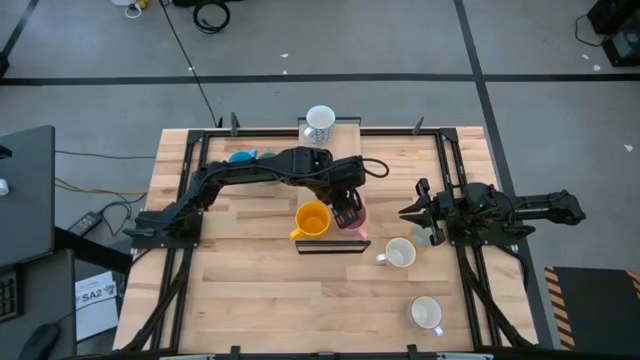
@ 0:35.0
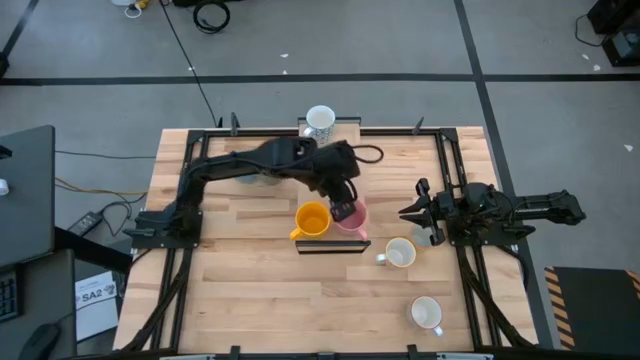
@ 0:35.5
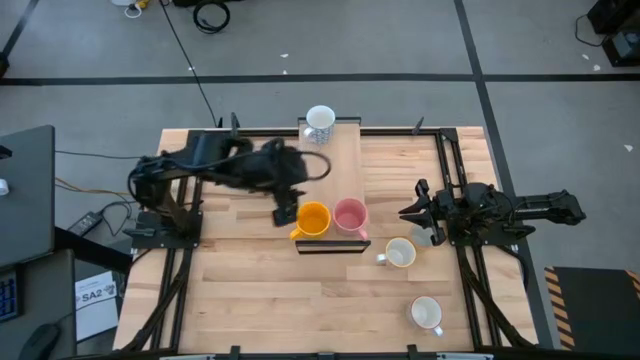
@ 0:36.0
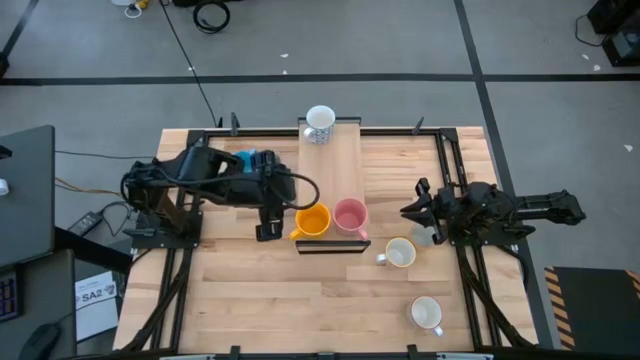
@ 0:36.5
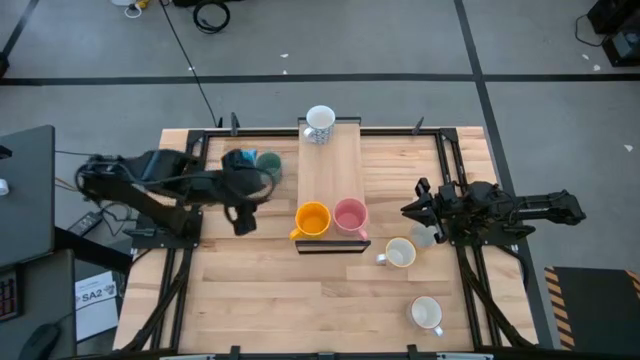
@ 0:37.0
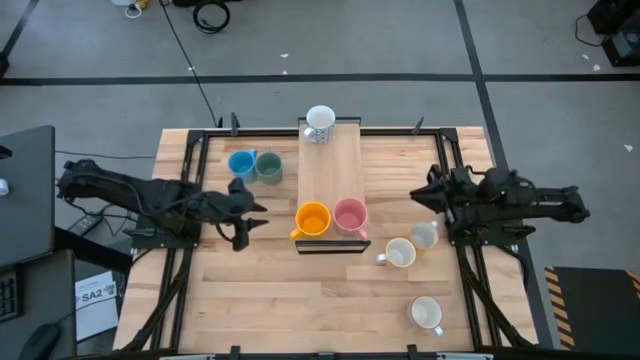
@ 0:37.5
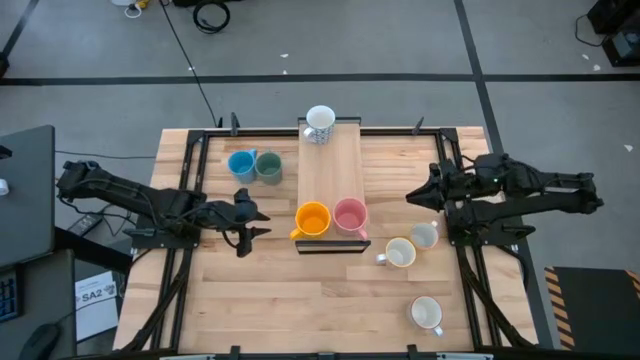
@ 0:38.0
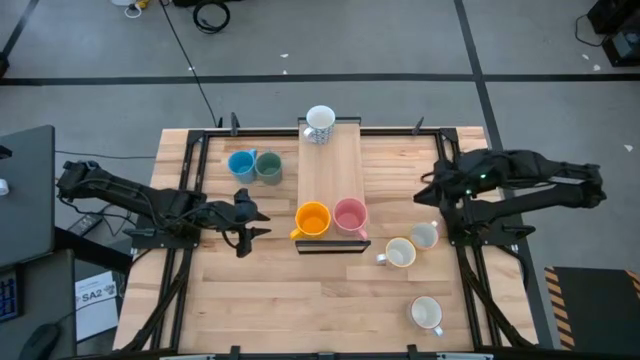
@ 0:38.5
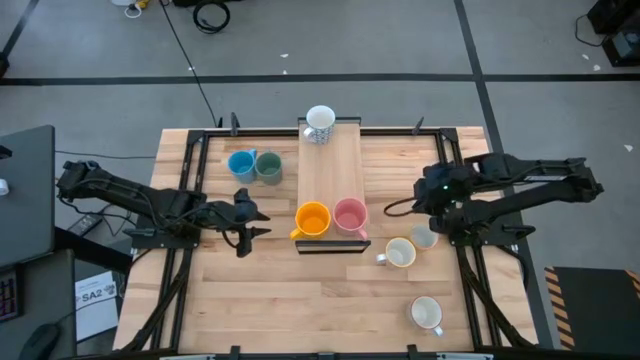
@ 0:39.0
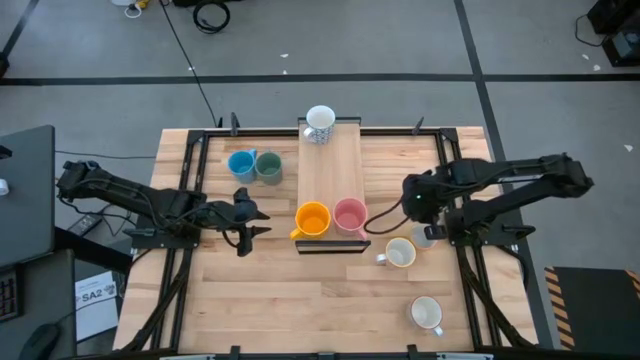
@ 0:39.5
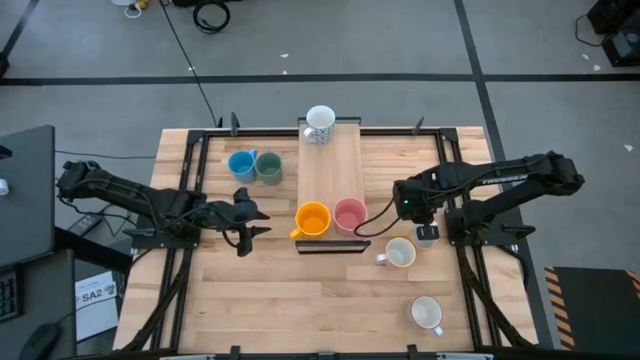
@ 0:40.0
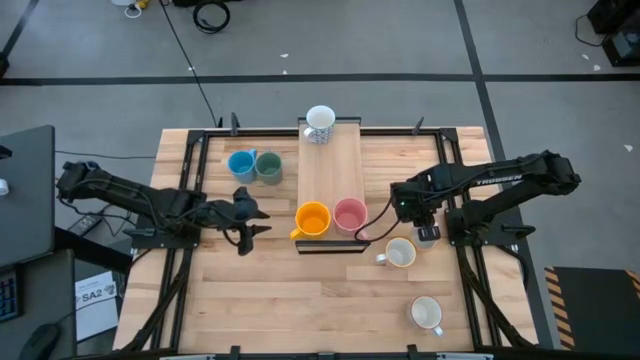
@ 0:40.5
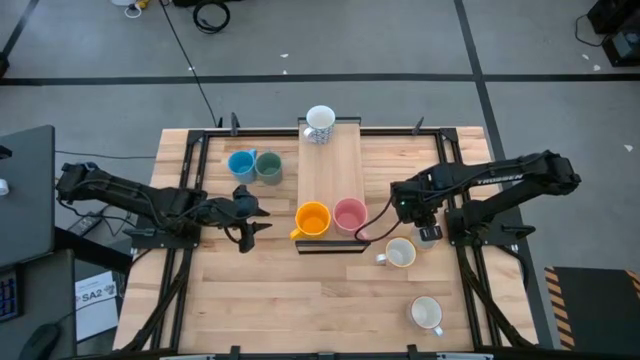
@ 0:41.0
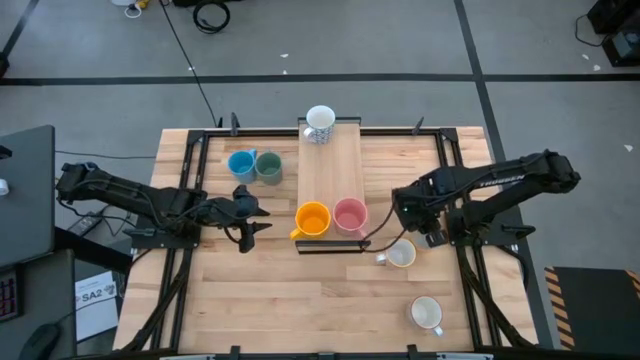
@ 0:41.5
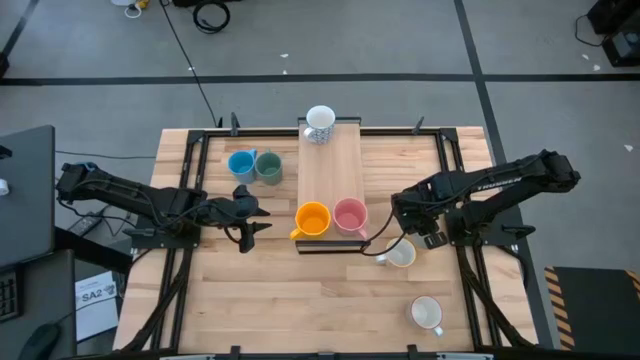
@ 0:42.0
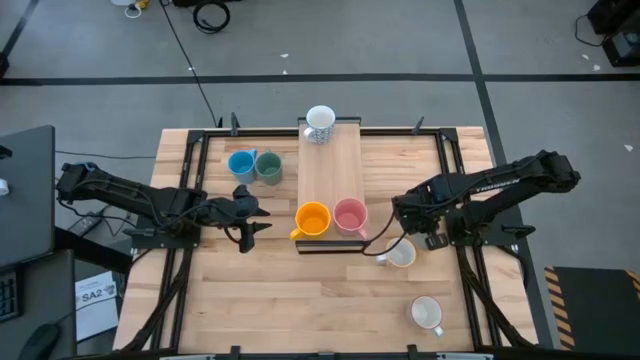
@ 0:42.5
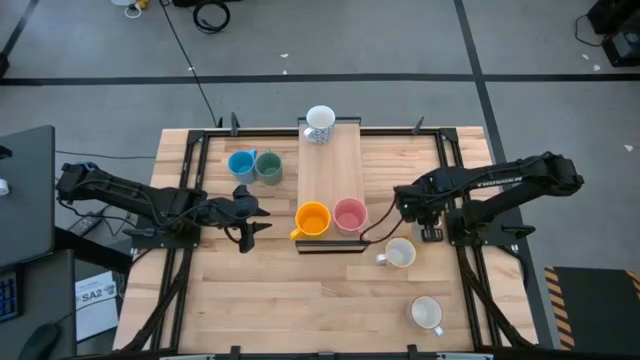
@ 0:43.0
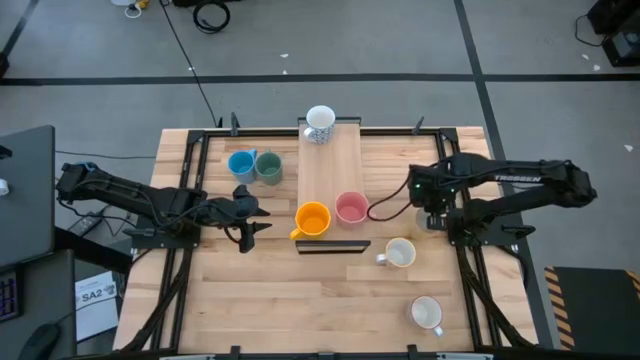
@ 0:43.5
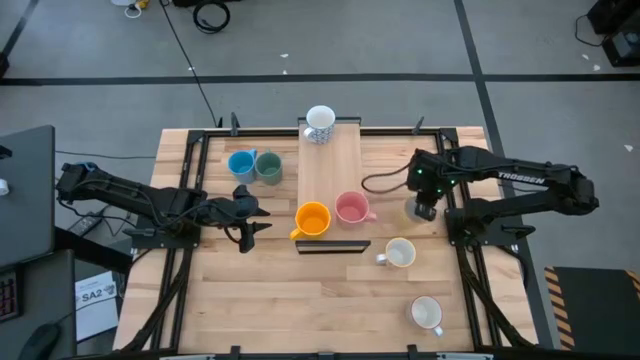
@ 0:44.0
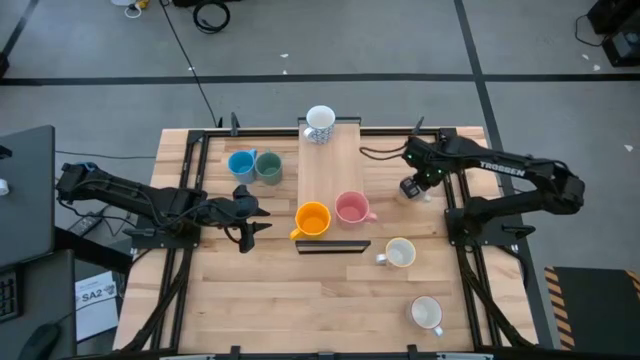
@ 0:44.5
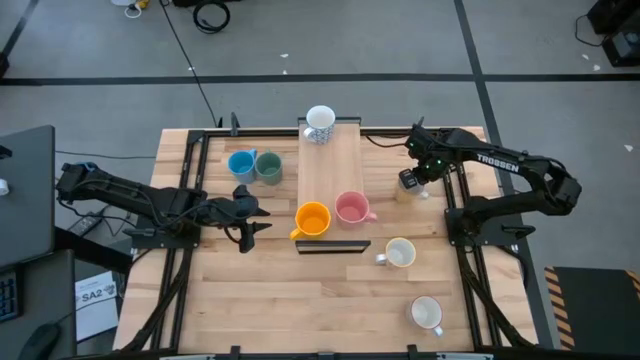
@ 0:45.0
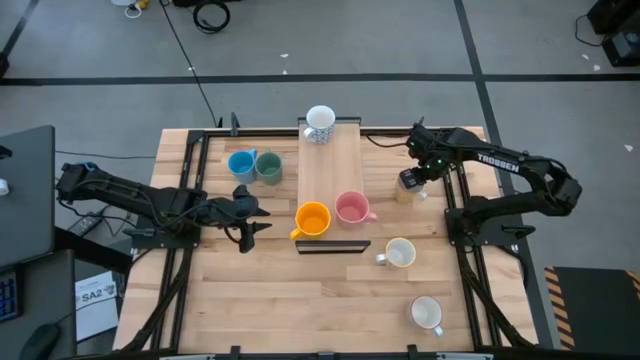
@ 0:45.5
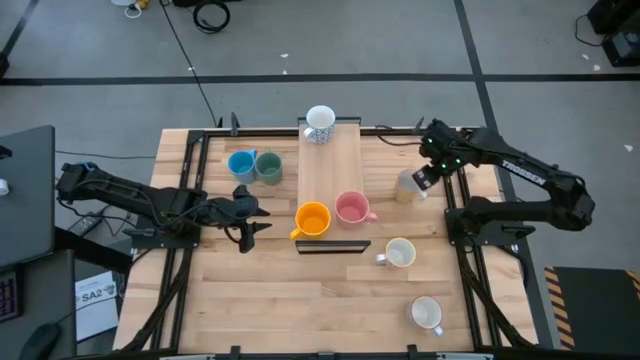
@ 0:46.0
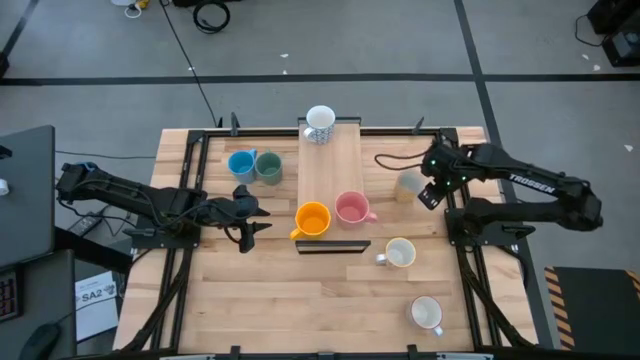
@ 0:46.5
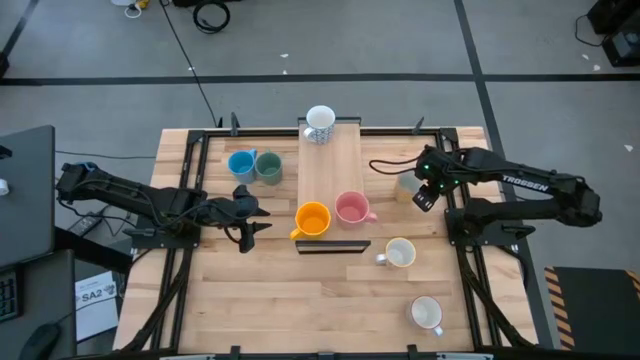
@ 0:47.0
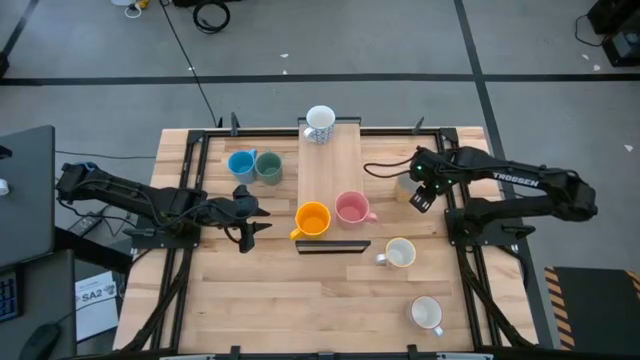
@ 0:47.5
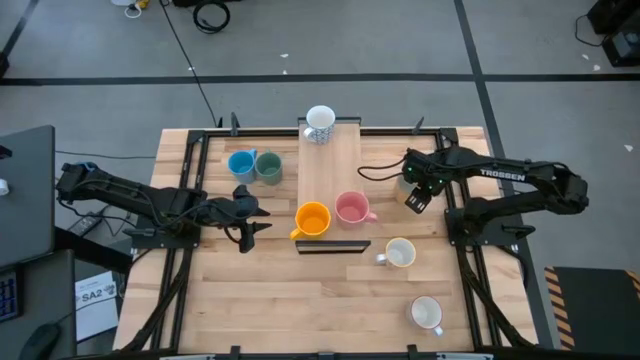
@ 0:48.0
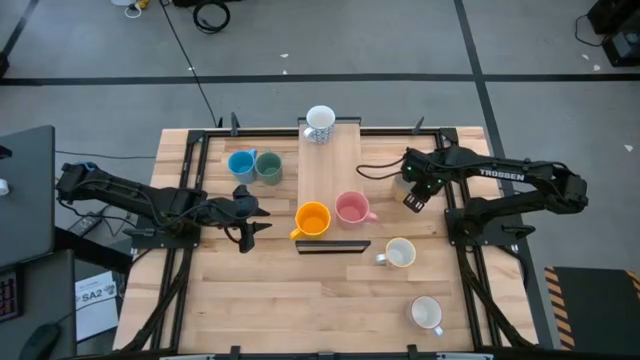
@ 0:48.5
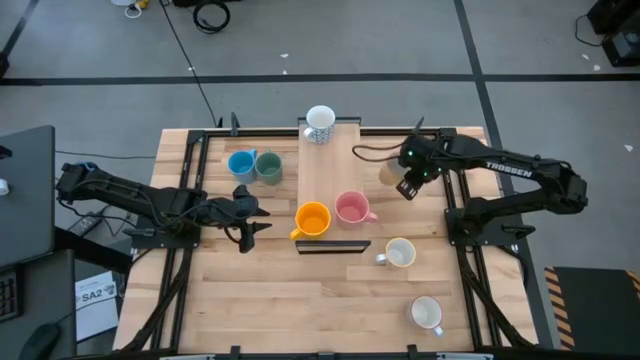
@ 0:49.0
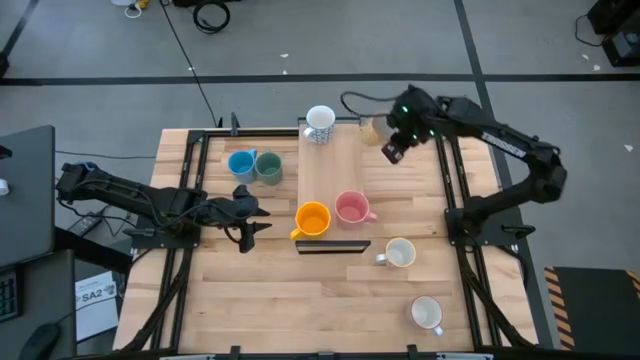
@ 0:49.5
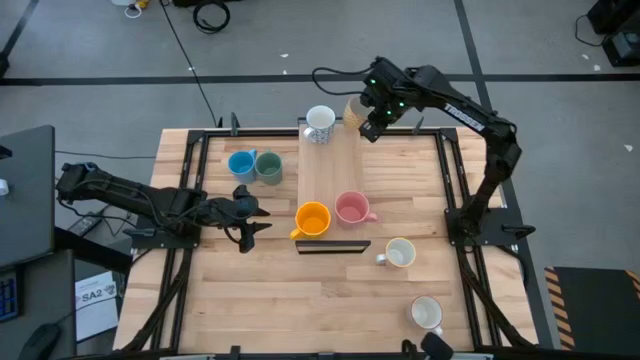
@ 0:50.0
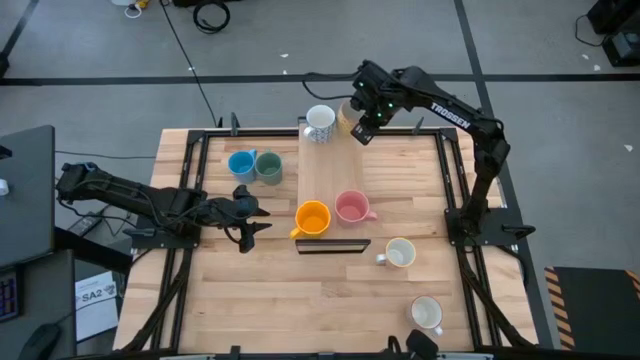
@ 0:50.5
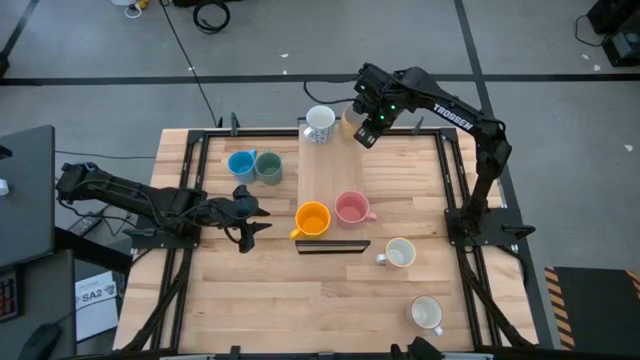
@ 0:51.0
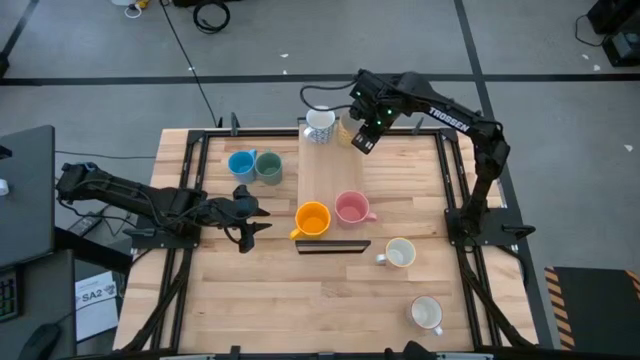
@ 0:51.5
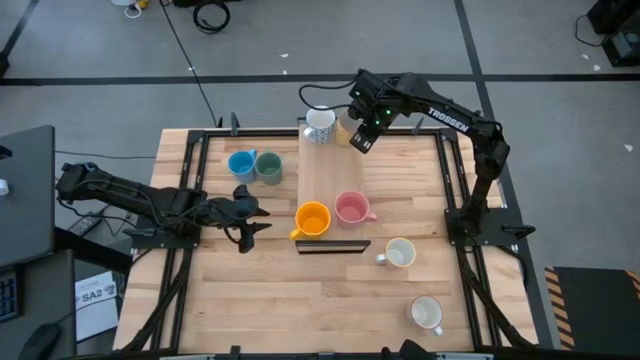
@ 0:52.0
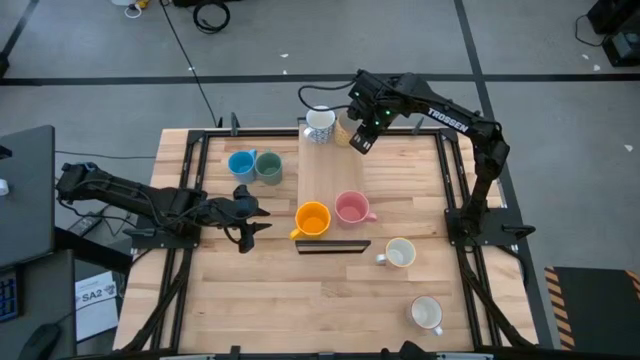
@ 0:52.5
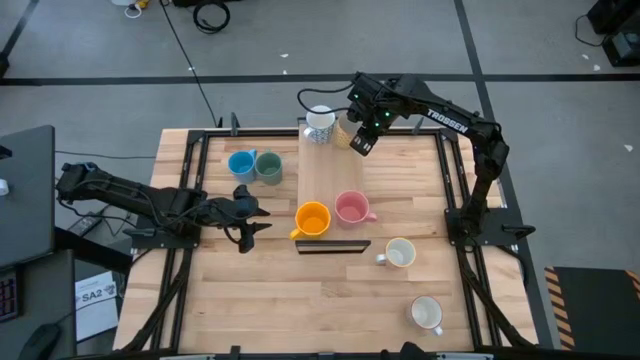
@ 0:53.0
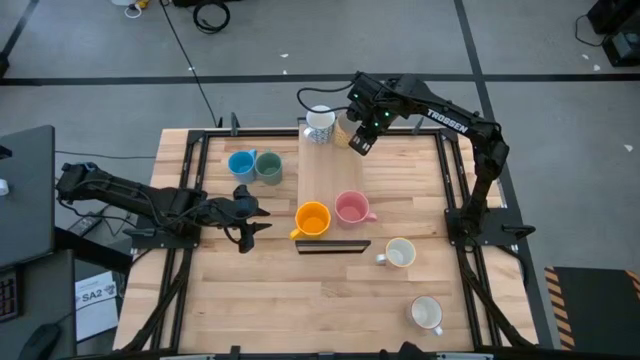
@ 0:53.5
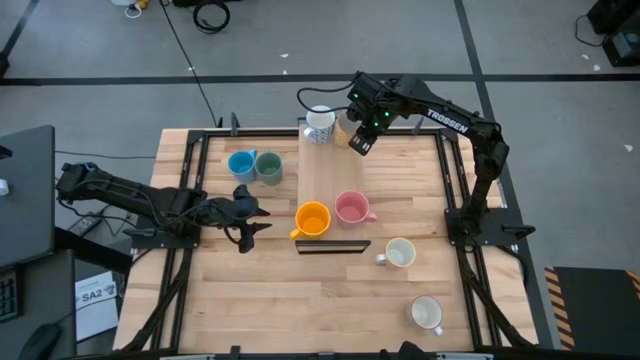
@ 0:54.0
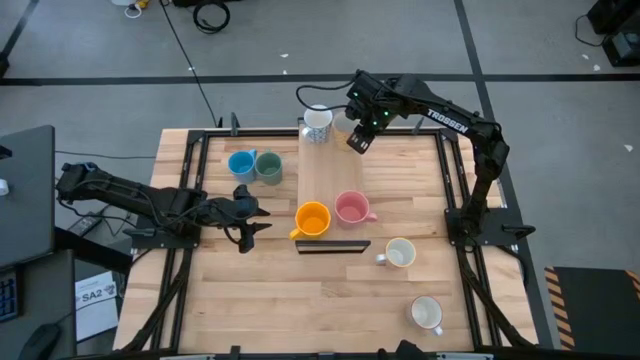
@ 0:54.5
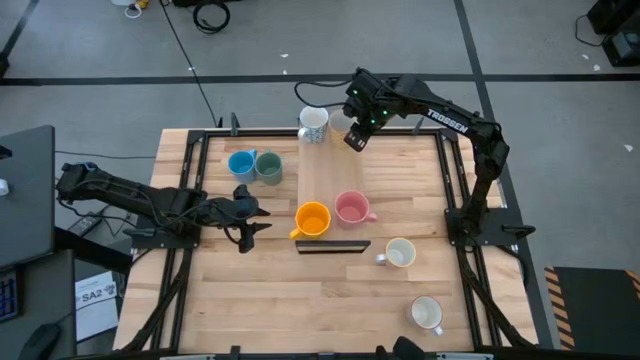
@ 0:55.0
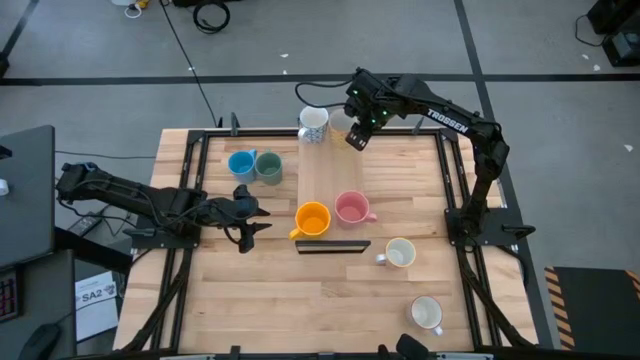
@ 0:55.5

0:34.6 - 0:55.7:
Task: Place coffee mugs
Put the orange patterned mug on the shelf
